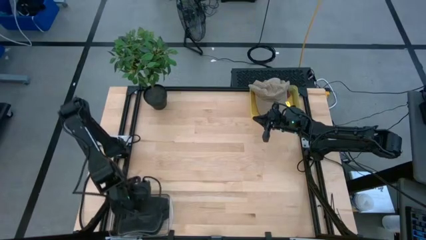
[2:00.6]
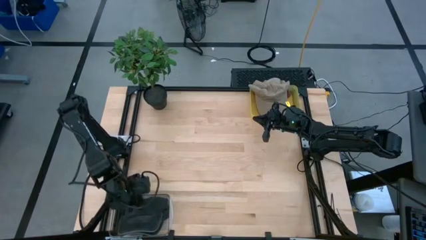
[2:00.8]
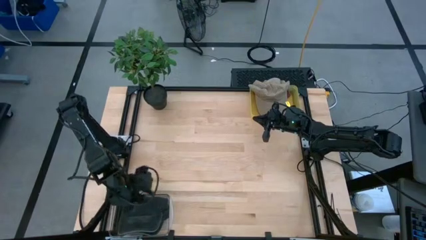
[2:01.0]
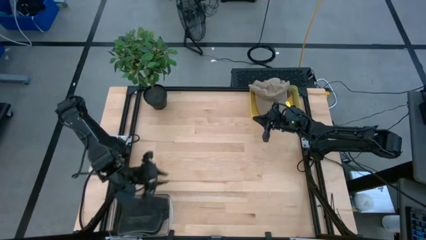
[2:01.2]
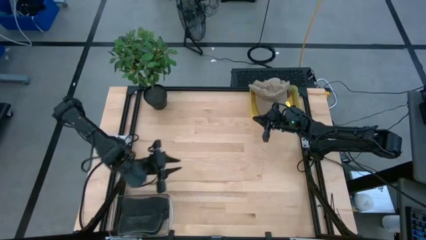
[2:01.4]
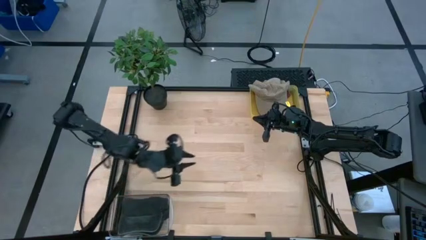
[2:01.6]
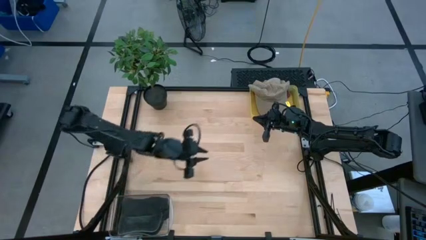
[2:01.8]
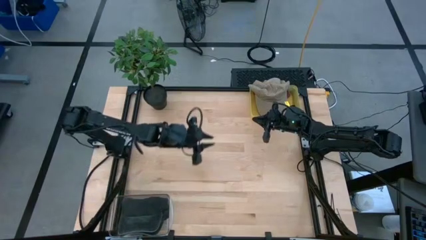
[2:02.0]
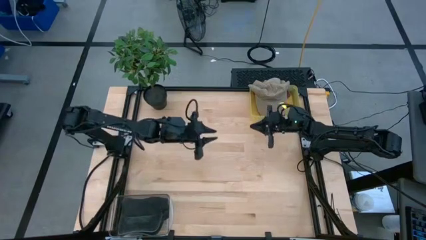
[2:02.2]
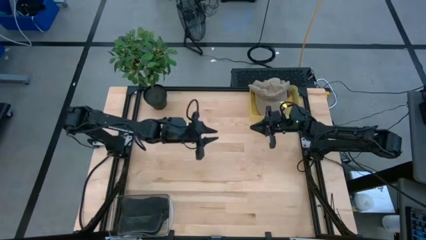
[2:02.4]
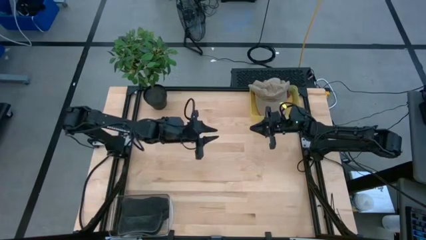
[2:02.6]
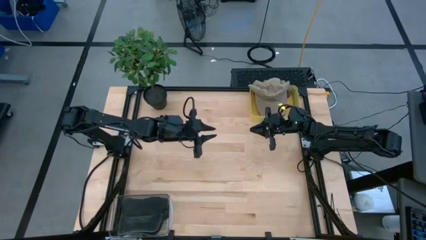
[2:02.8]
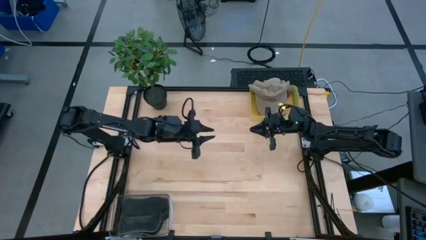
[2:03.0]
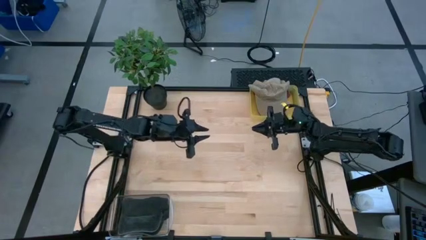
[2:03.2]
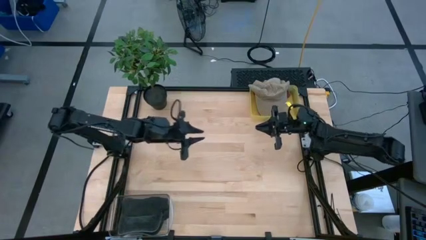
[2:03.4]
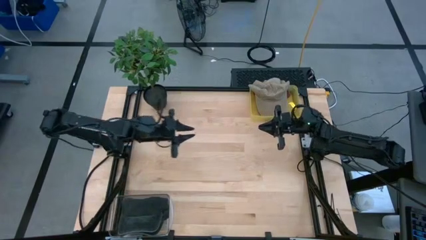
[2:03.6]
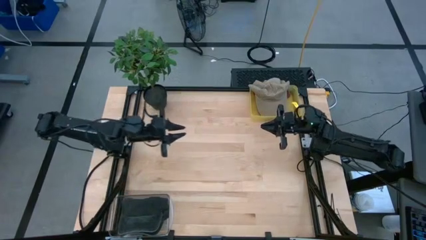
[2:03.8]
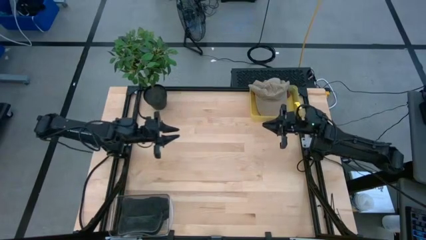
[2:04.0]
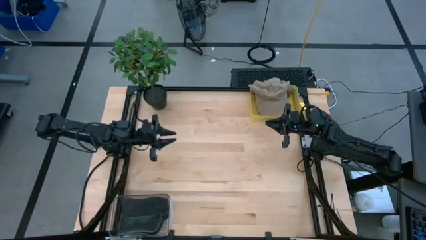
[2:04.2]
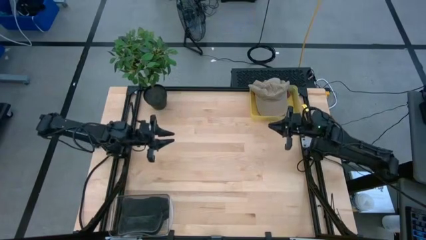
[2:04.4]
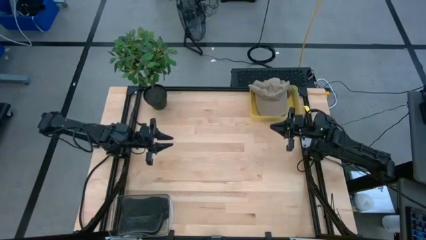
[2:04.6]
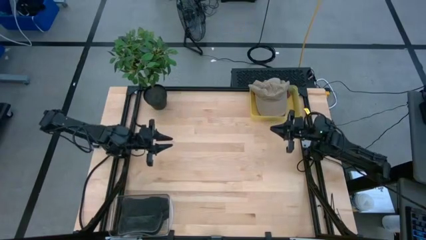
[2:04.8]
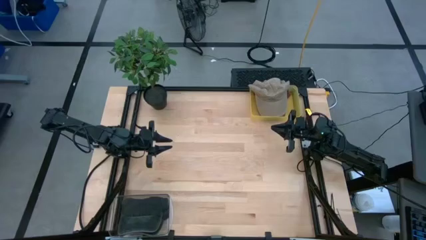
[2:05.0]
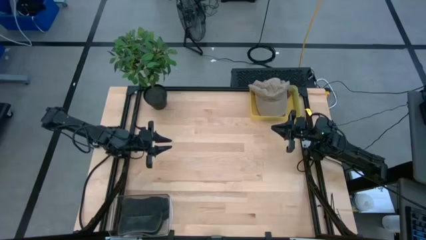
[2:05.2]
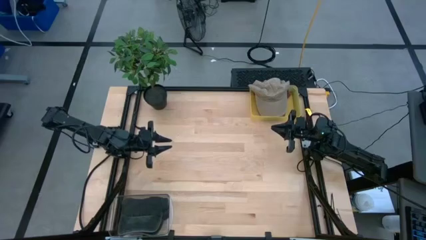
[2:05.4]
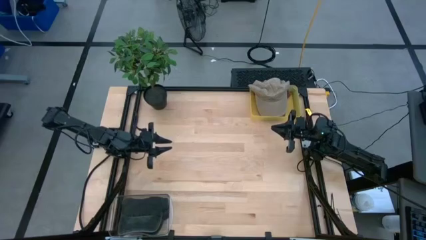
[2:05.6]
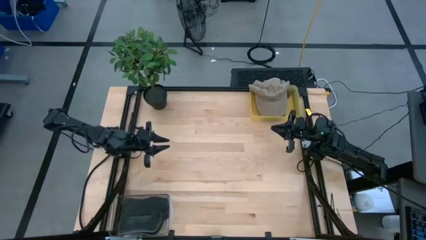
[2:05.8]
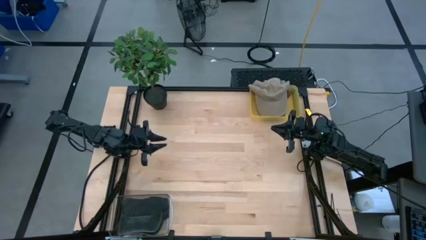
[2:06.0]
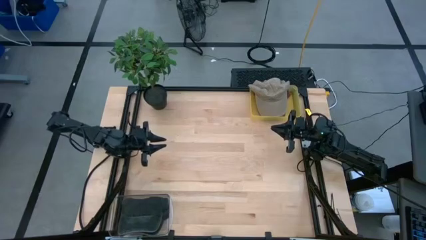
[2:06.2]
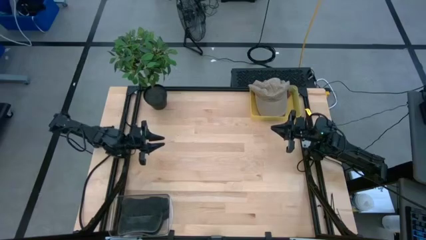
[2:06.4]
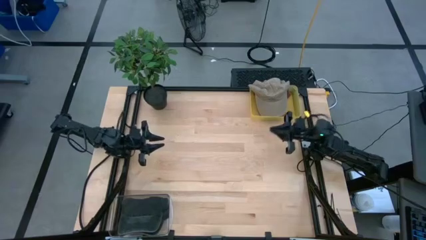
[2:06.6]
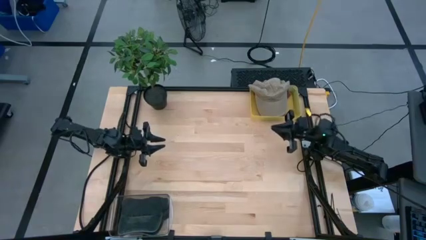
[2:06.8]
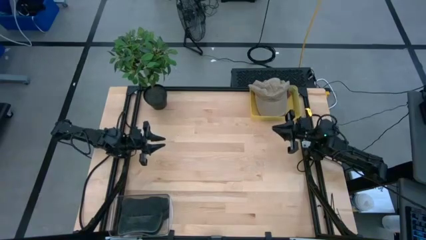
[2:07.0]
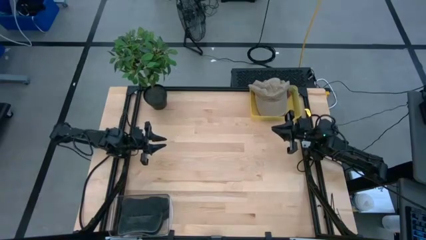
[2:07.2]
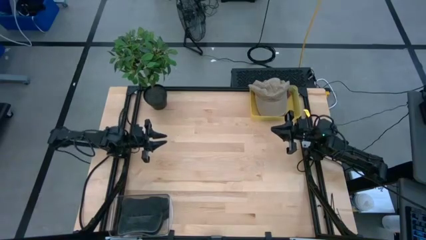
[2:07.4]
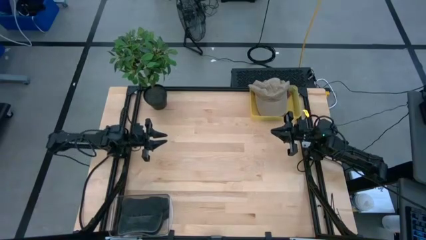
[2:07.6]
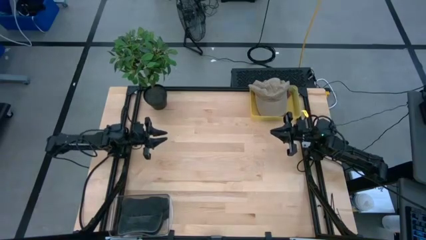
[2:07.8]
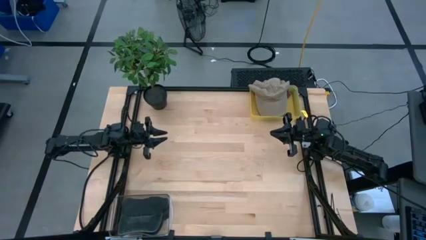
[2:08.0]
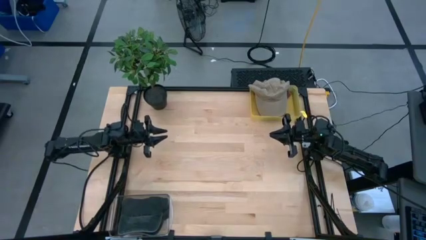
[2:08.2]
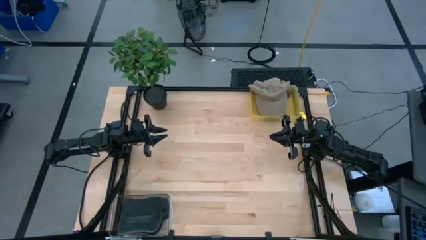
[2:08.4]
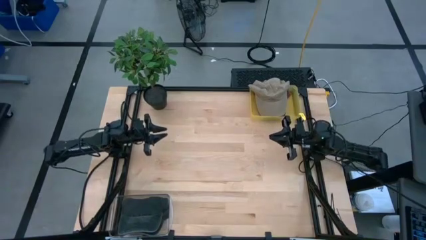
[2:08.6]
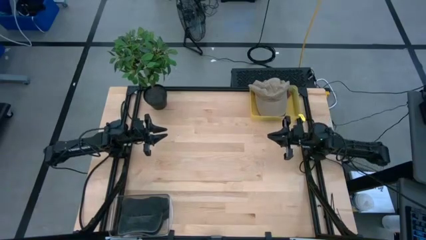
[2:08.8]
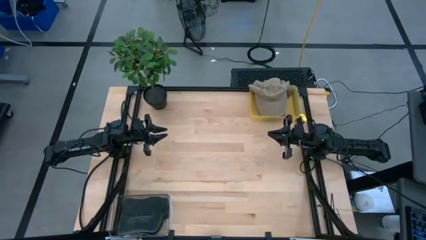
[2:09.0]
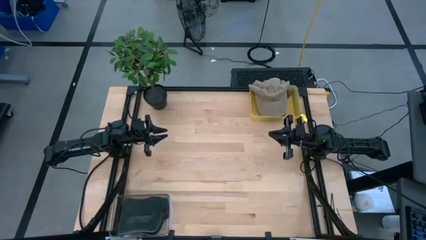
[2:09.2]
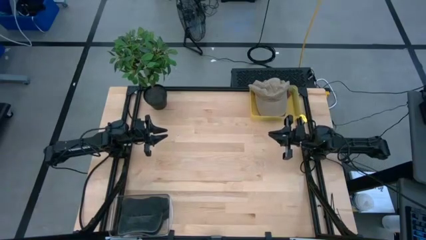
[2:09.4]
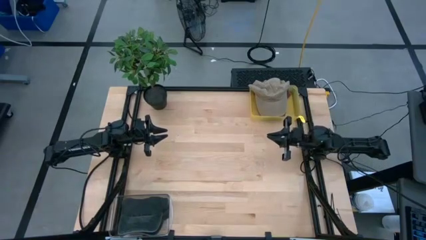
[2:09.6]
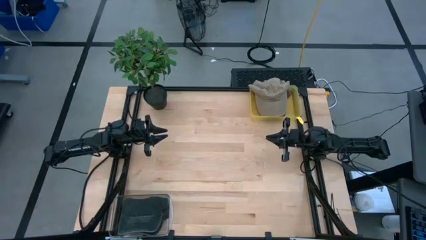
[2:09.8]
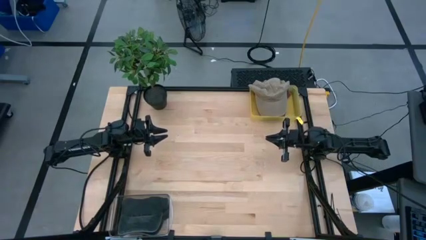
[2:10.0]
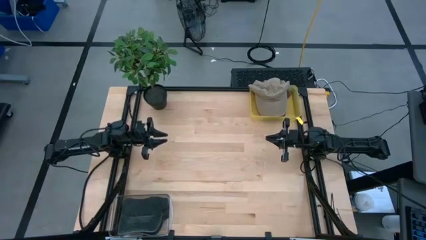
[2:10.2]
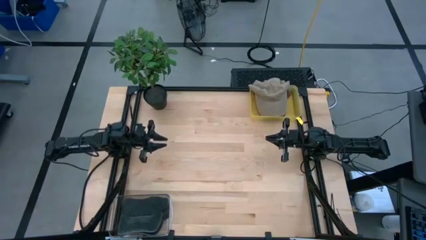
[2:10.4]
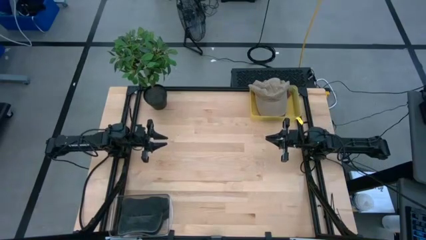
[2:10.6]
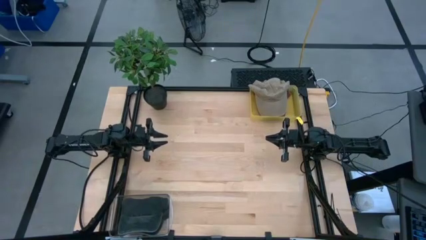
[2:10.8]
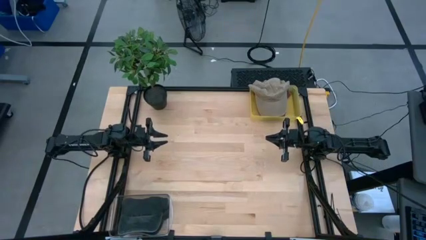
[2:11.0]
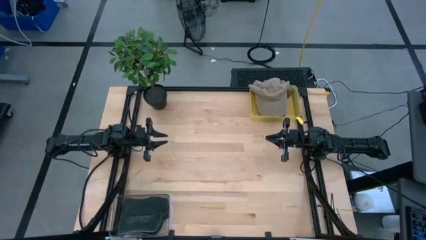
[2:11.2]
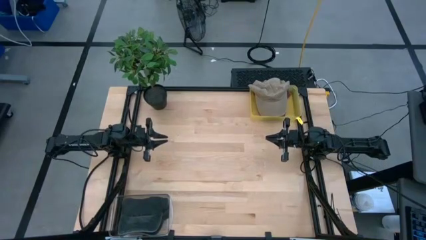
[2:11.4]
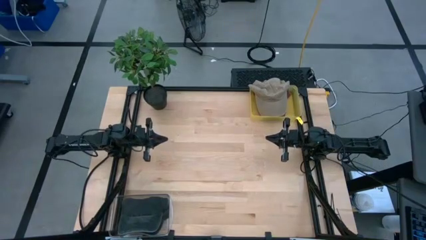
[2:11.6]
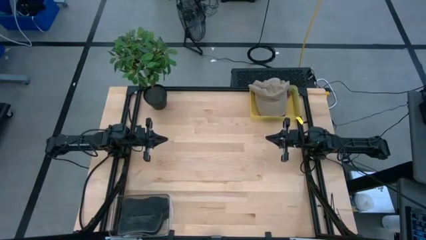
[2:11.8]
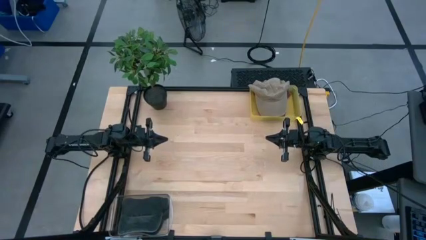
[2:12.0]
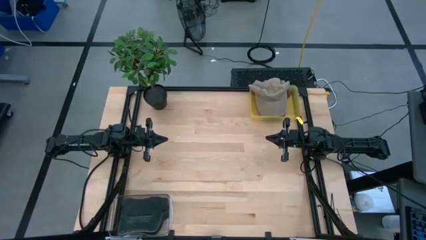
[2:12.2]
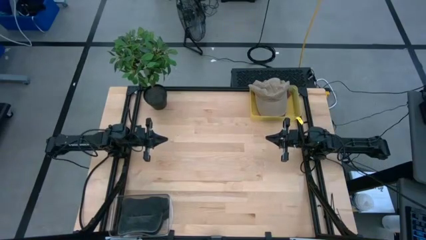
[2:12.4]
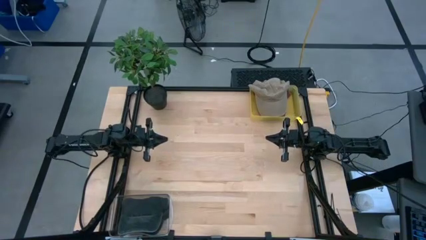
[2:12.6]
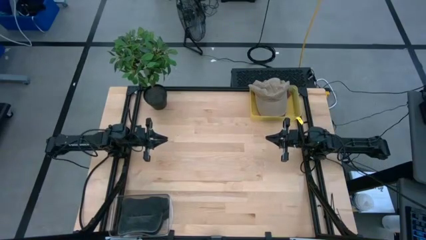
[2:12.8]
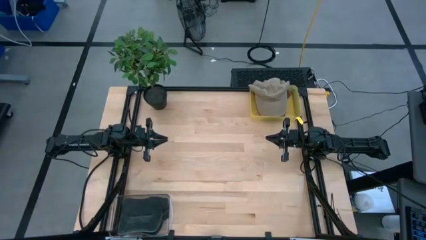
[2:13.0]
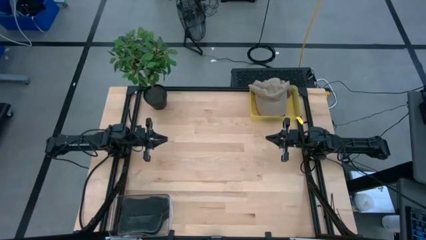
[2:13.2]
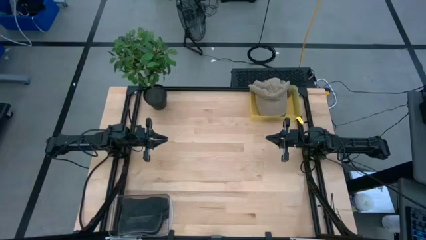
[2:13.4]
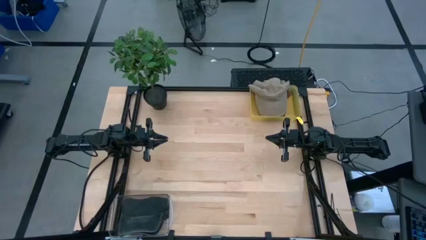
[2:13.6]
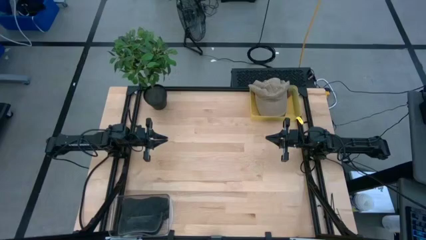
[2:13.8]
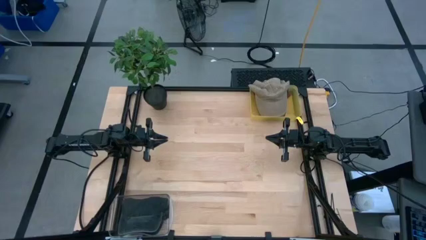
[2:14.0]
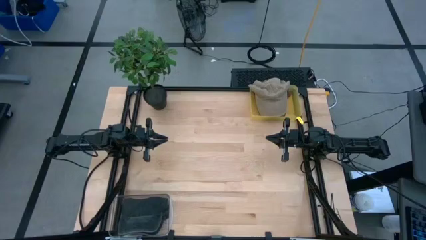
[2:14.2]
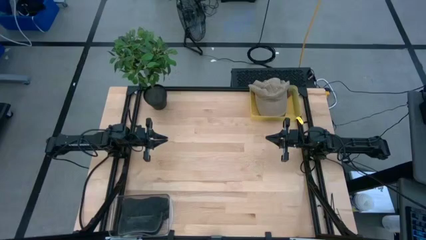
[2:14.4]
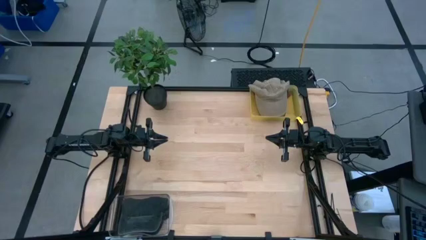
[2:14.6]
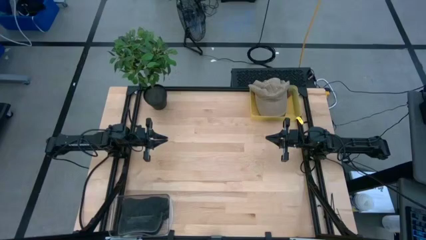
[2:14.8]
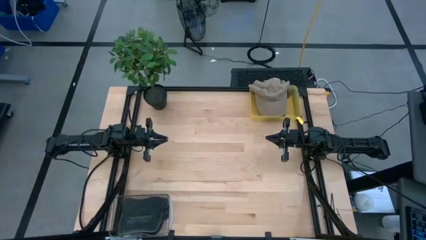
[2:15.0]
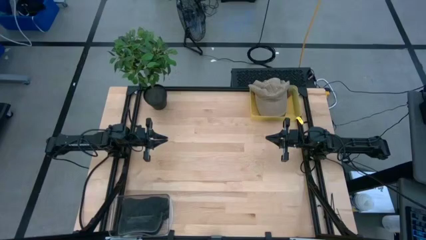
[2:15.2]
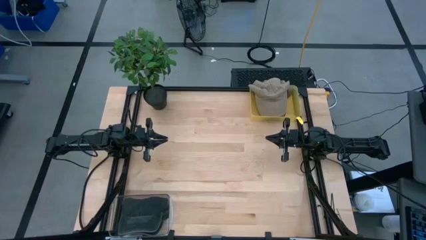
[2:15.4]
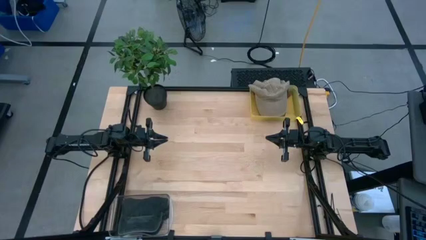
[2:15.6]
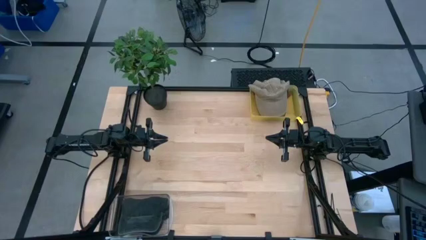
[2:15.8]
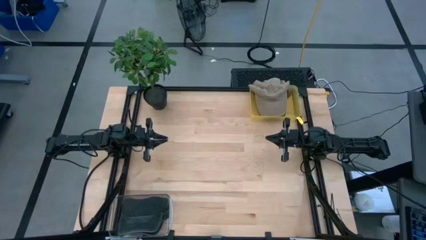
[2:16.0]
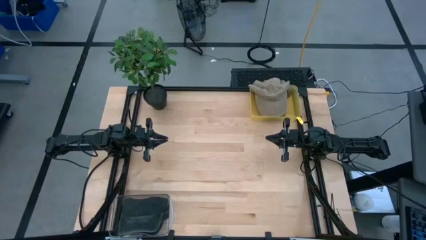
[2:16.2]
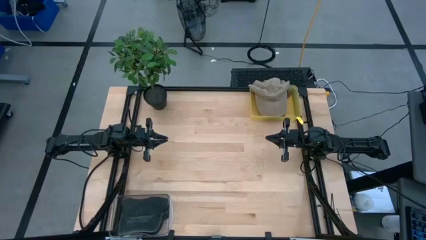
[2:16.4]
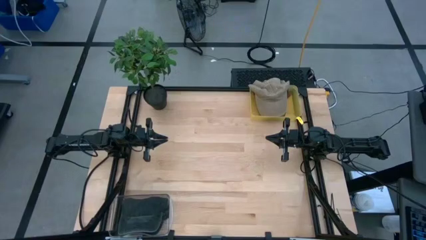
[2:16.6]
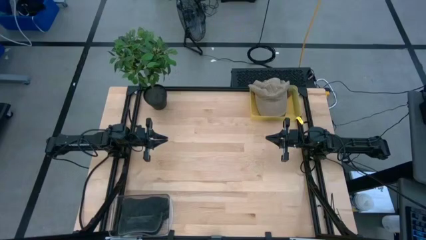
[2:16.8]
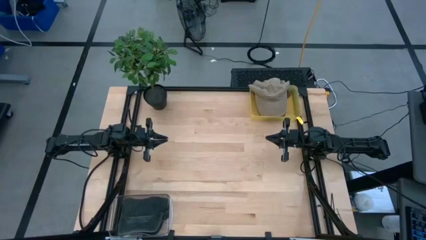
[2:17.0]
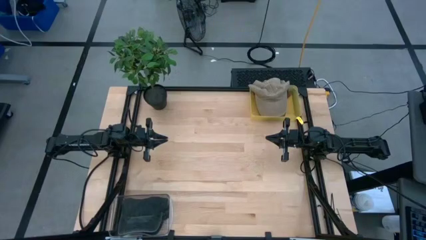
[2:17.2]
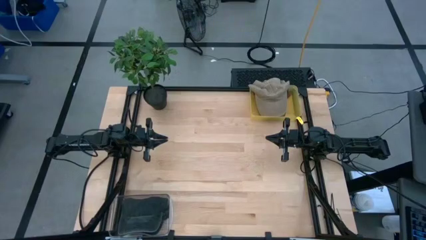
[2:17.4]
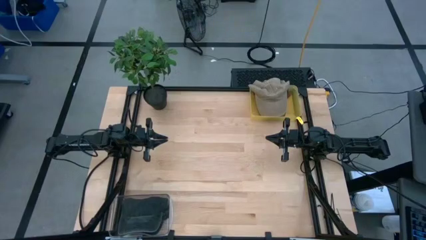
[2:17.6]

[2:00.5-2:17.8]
Task: Pick & Place hat
Return to Home Position
